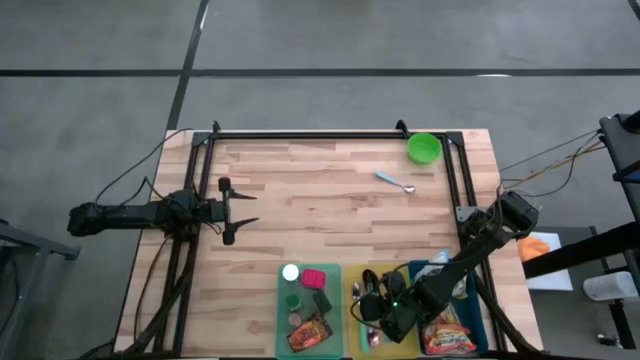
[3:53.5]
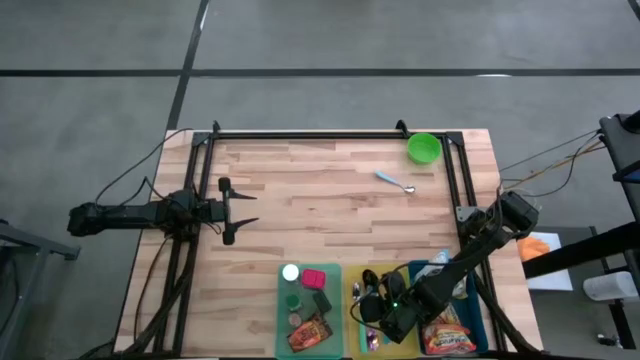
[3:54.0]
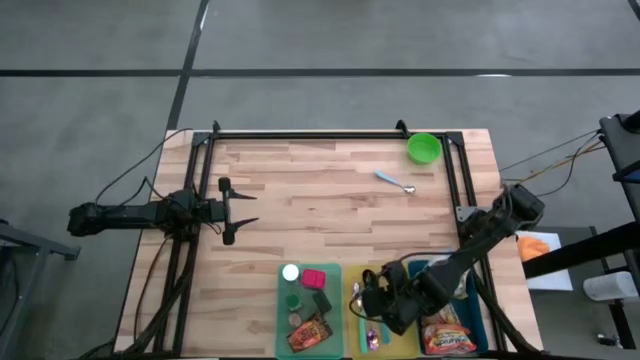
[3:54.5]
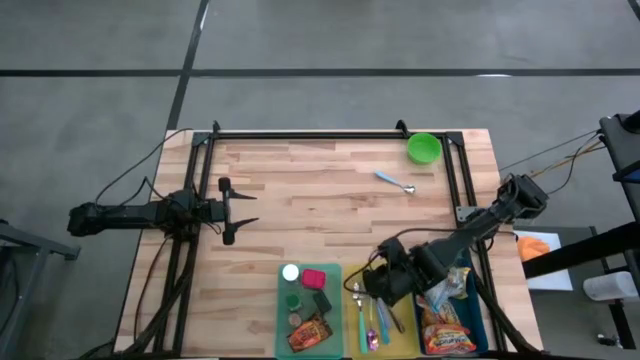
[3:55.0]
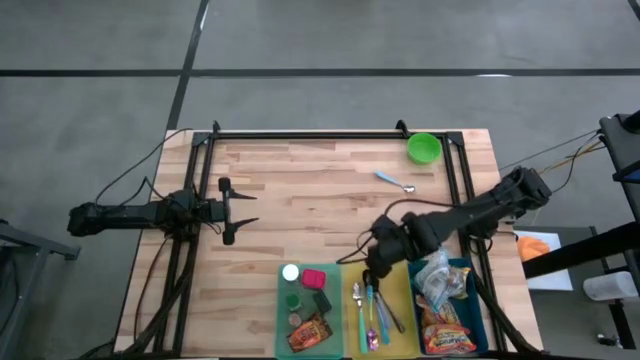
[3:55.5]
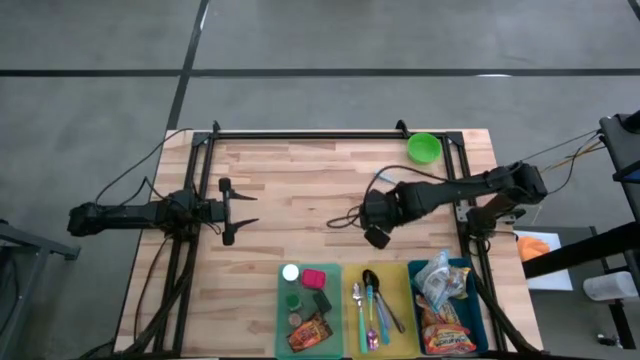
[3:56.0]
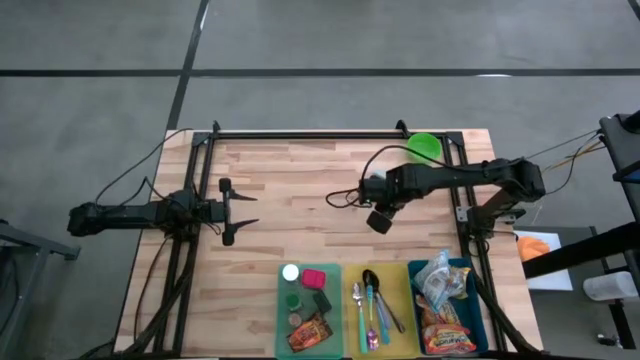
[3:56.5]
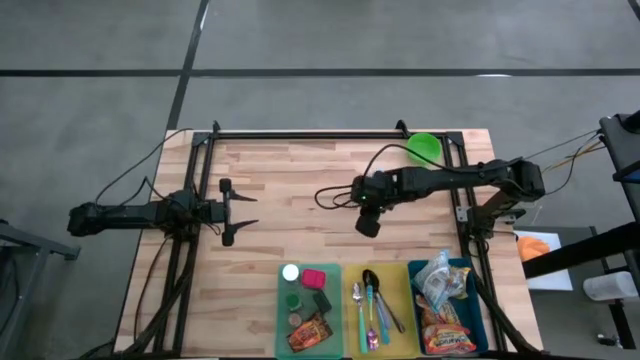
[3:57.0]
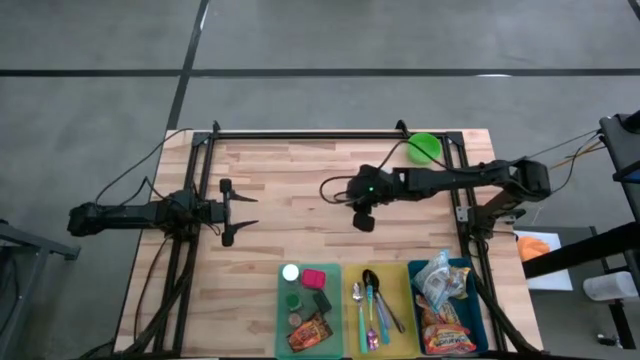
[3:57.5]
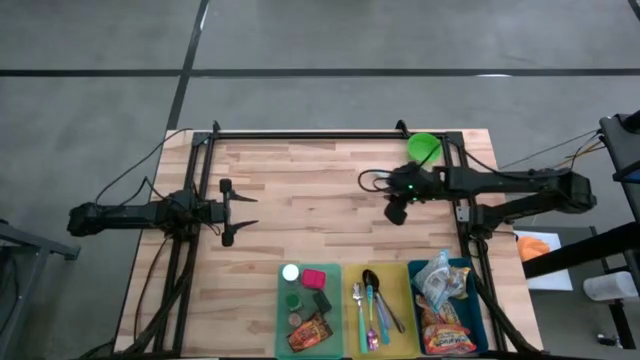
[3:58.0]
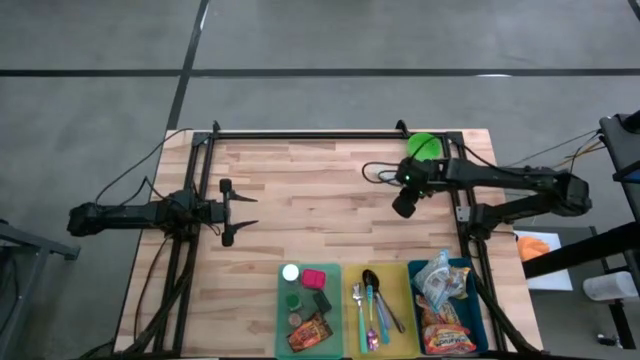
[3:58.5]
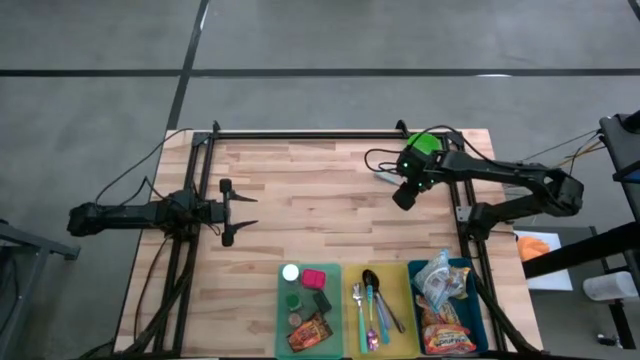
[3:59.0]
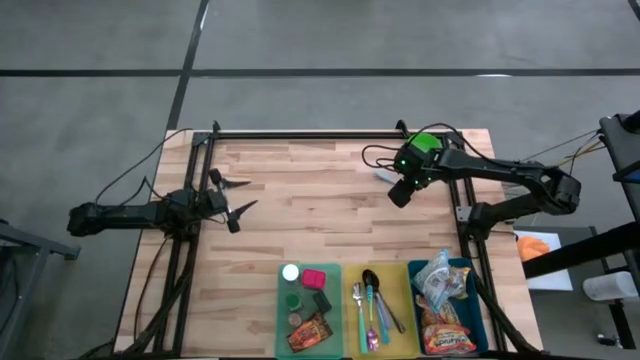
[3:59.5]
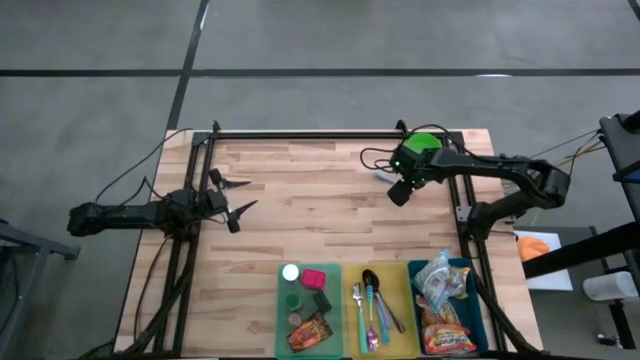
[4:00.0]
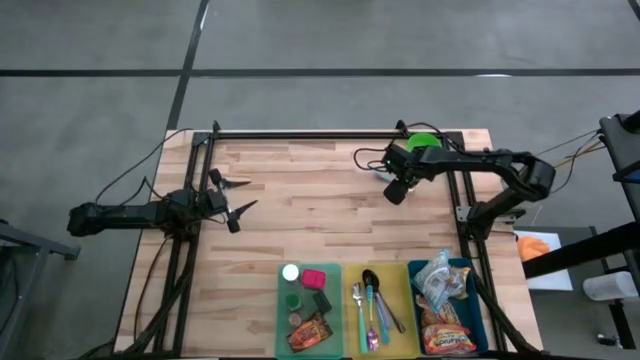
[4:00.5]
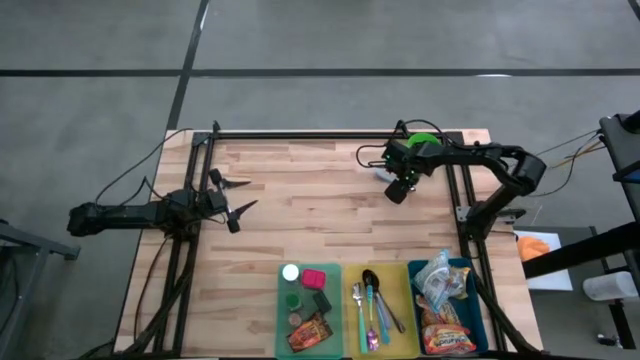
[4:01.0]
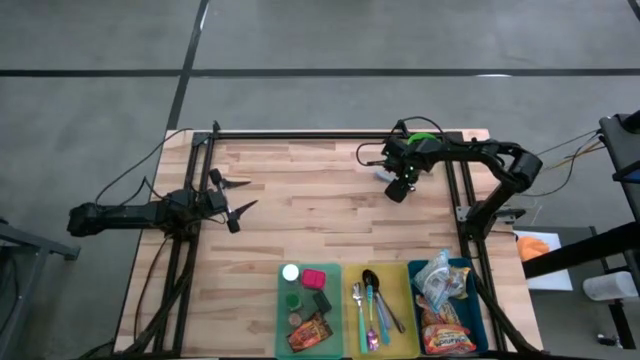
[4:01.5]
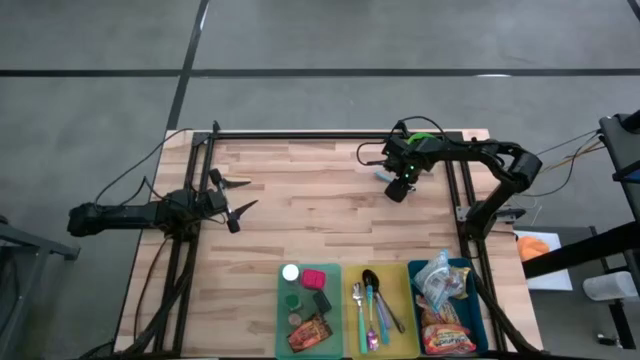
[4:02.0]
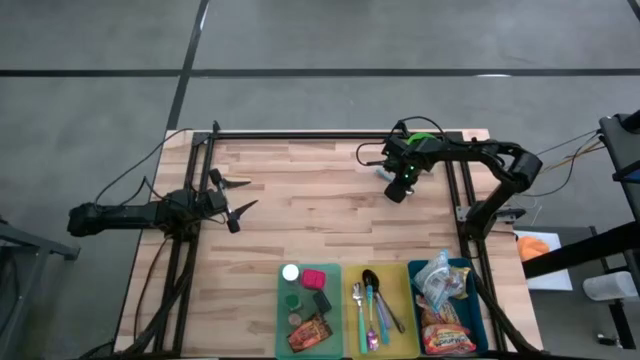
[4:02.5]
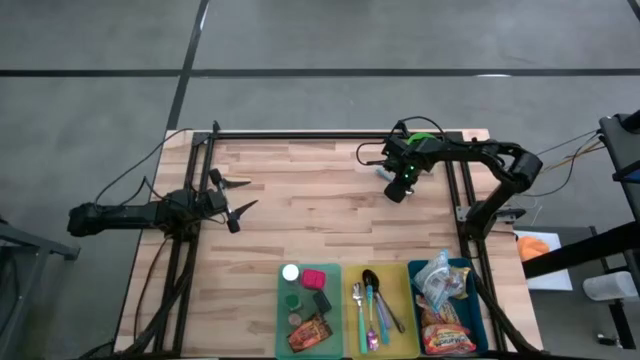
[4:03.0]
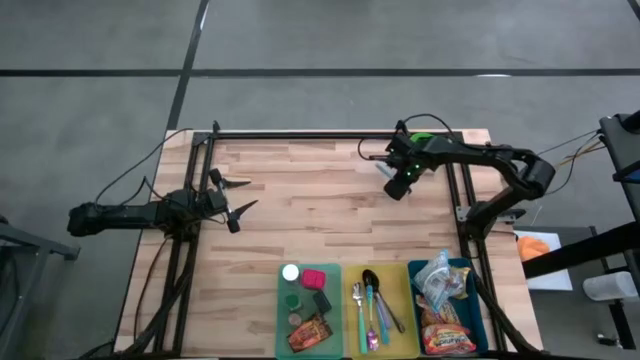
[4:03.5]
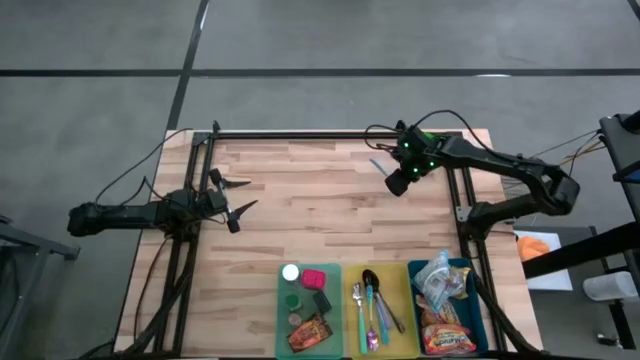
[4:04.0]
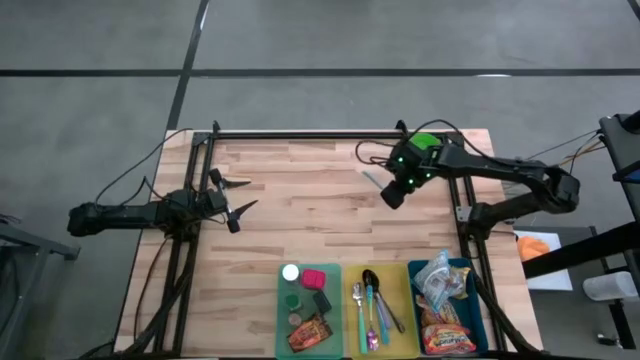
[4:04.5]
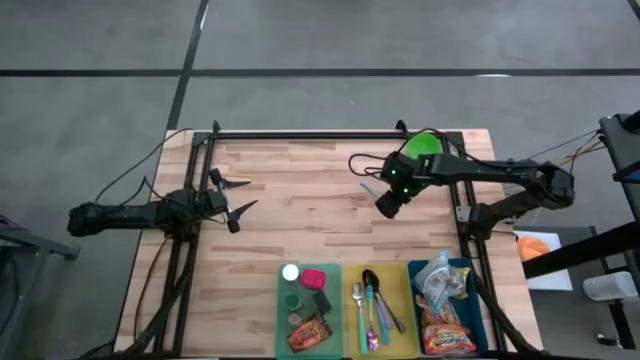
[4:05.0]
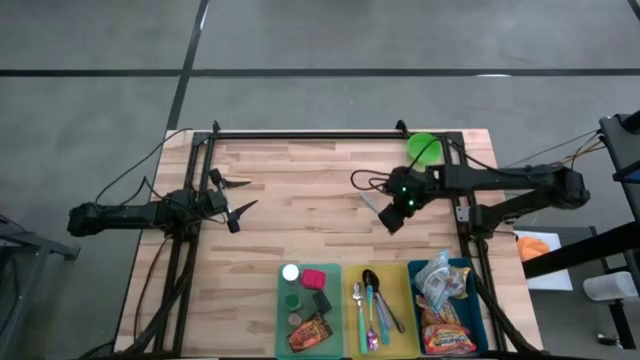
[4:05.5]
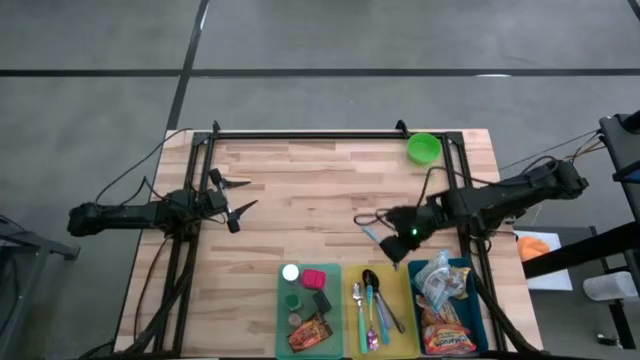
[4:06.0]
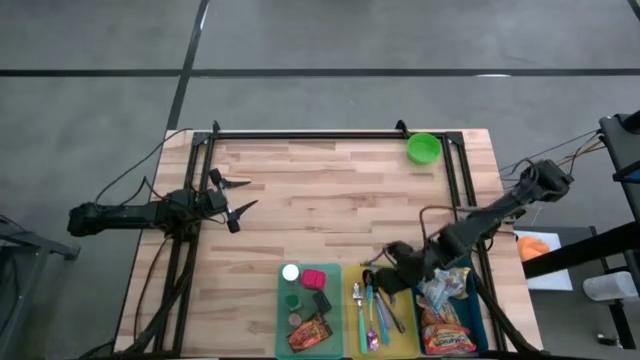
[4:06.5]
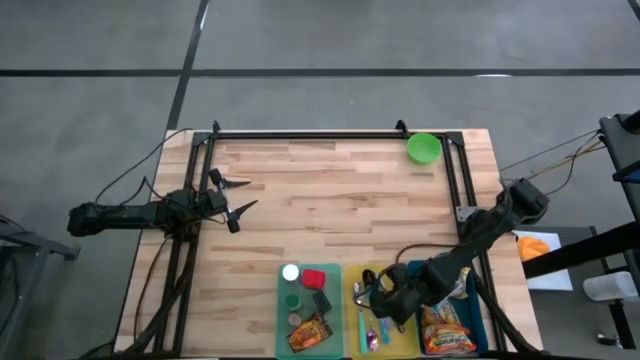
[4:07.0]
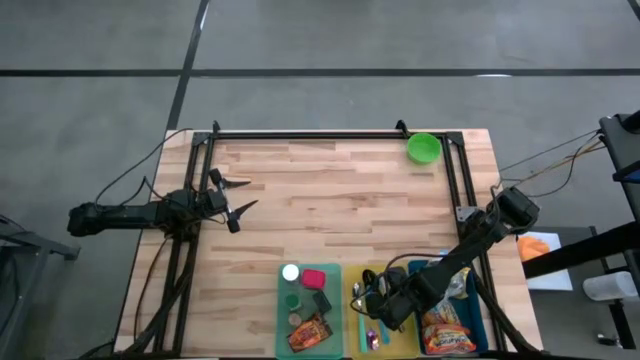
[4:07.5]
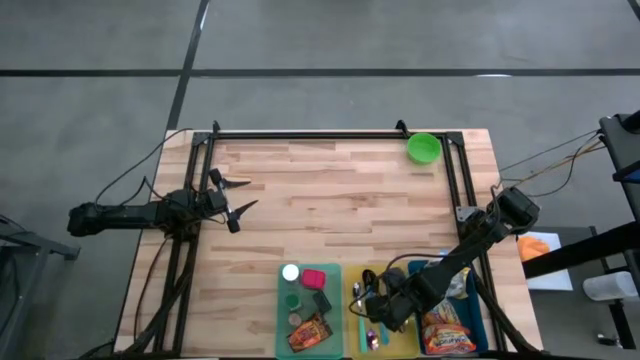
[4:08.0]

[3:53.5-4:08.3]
Put the blue spoon into the yellow bin
